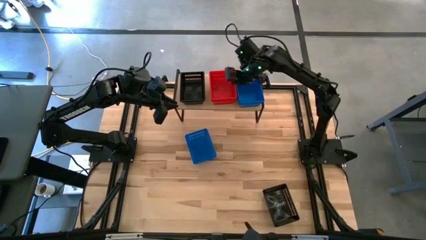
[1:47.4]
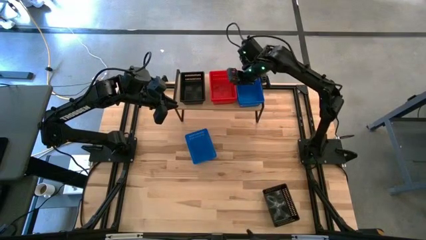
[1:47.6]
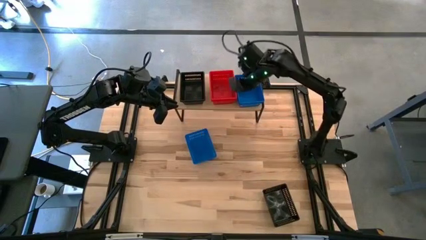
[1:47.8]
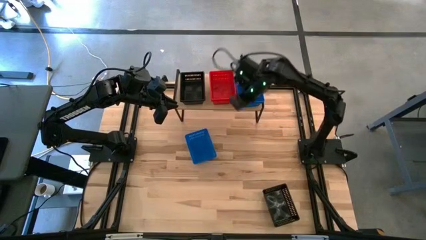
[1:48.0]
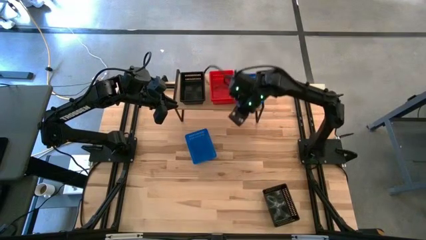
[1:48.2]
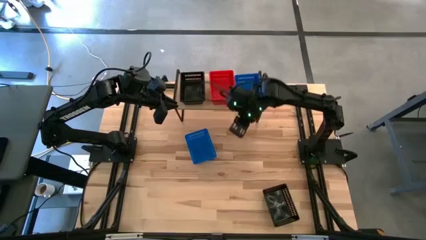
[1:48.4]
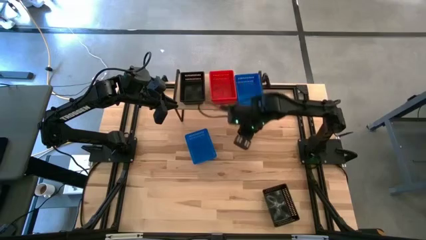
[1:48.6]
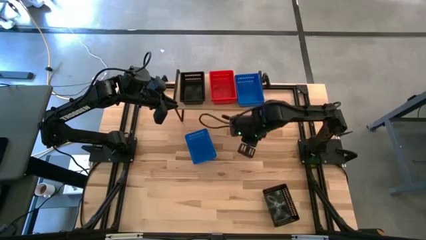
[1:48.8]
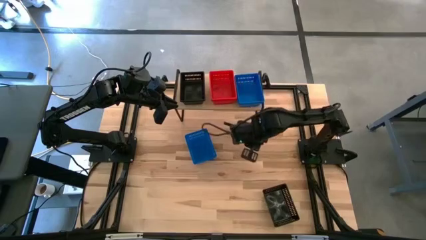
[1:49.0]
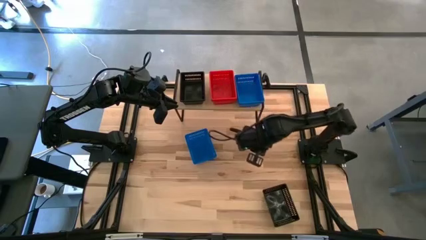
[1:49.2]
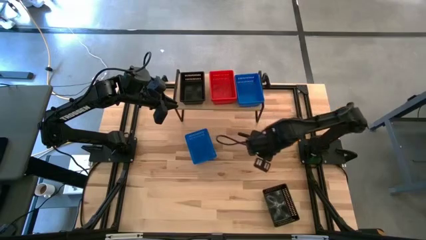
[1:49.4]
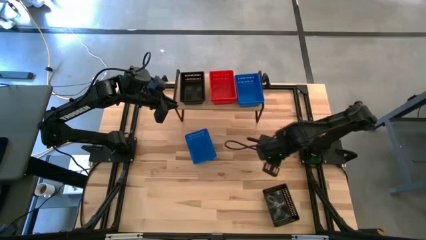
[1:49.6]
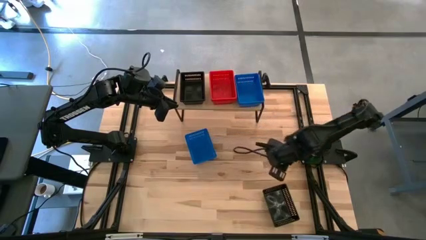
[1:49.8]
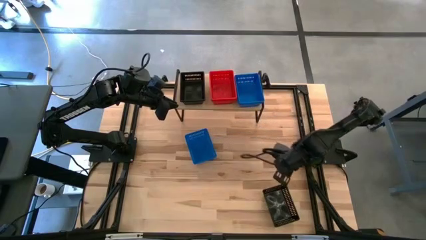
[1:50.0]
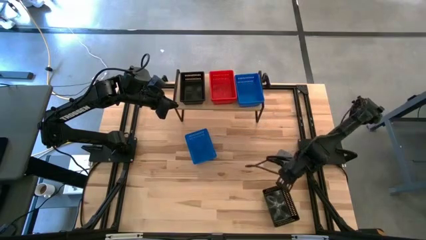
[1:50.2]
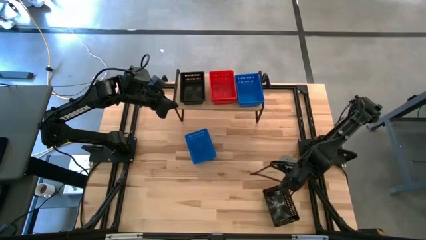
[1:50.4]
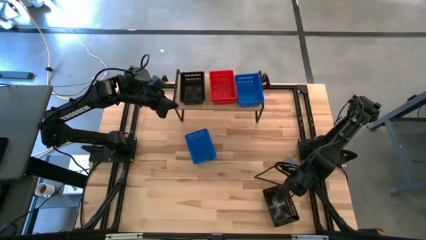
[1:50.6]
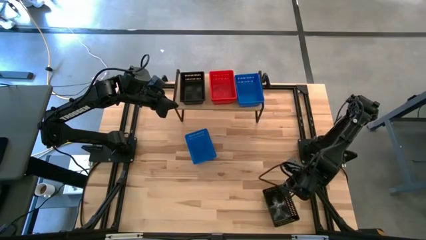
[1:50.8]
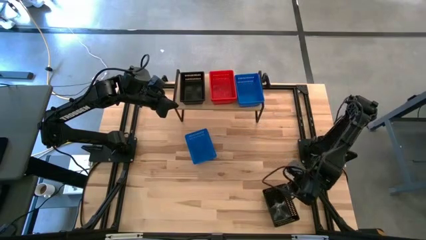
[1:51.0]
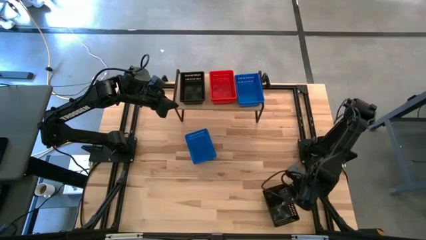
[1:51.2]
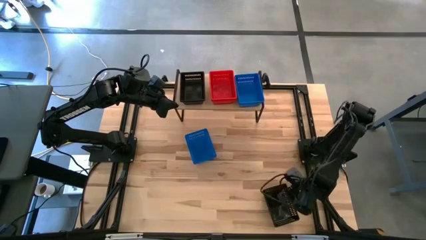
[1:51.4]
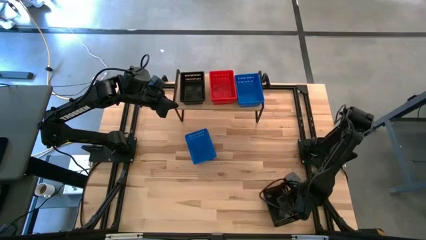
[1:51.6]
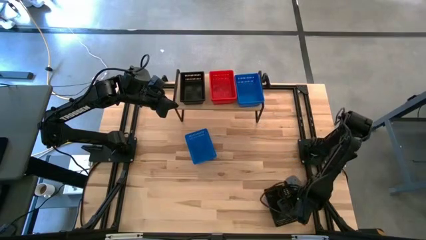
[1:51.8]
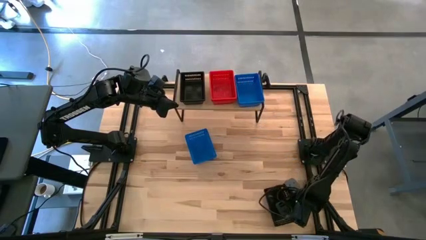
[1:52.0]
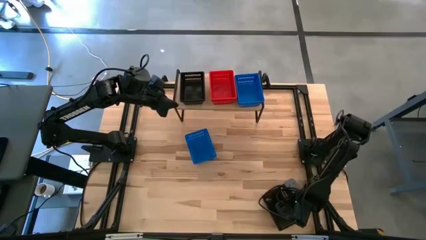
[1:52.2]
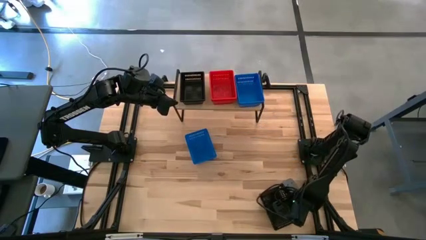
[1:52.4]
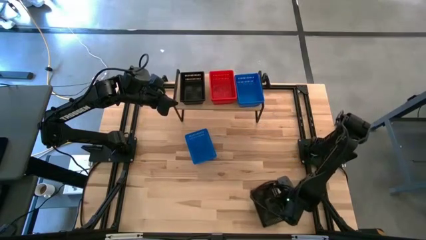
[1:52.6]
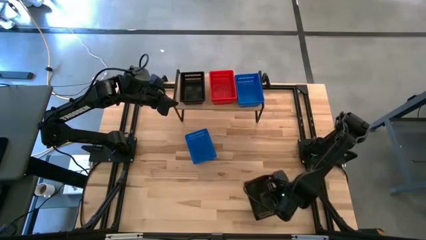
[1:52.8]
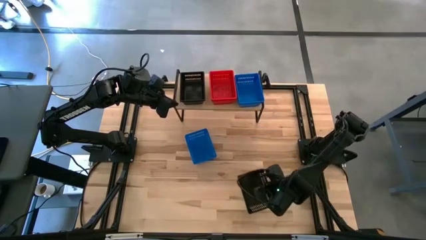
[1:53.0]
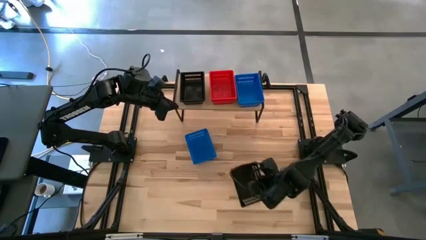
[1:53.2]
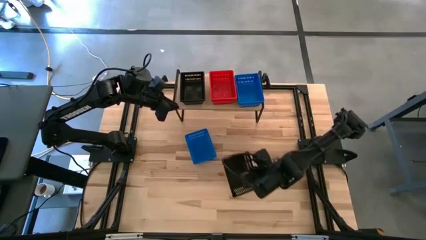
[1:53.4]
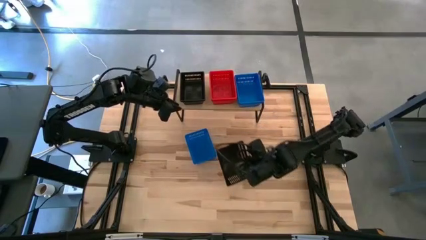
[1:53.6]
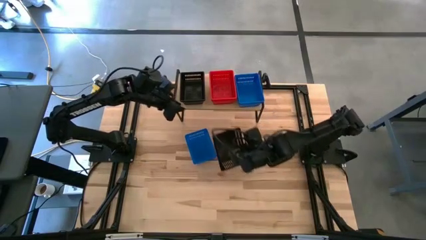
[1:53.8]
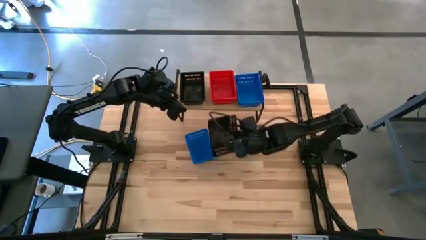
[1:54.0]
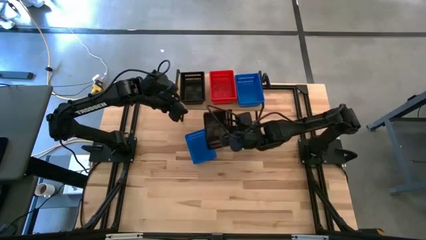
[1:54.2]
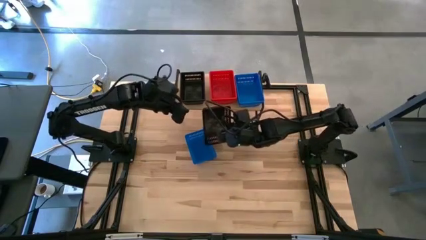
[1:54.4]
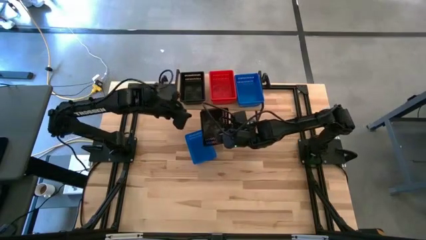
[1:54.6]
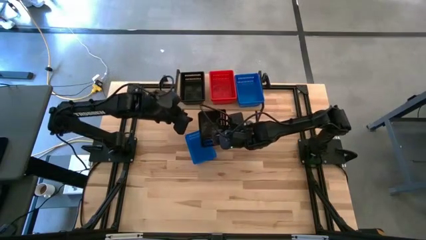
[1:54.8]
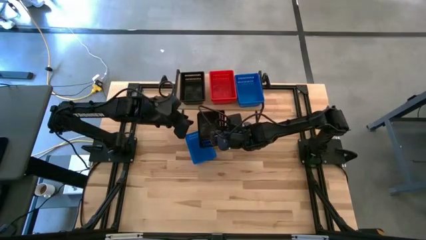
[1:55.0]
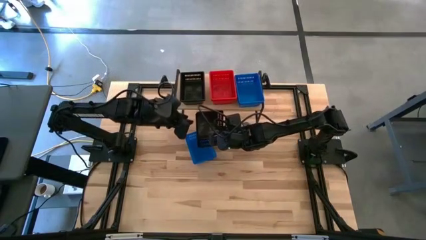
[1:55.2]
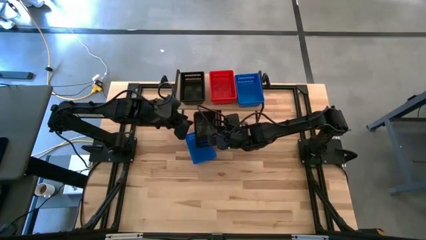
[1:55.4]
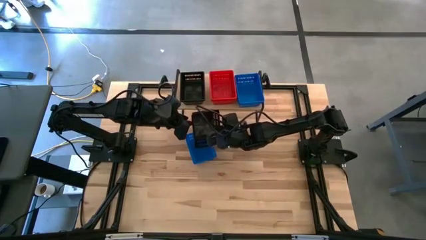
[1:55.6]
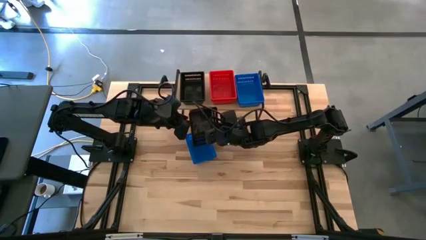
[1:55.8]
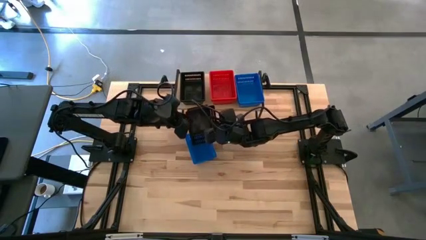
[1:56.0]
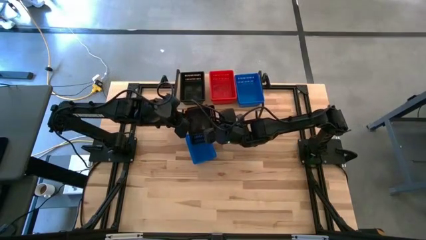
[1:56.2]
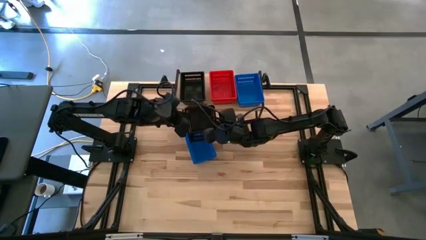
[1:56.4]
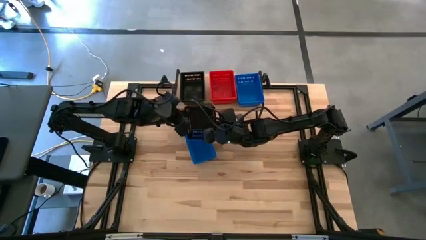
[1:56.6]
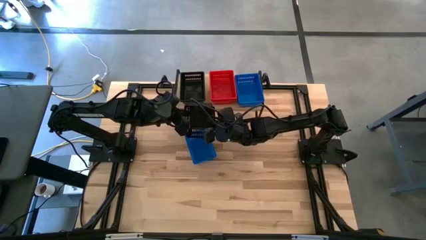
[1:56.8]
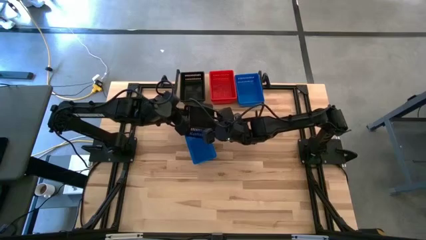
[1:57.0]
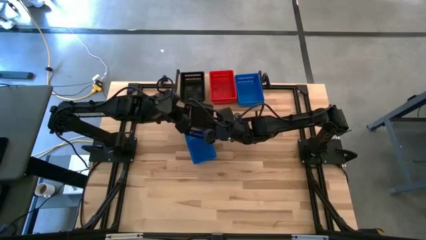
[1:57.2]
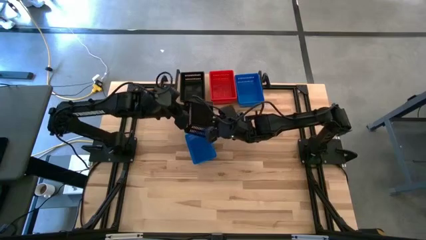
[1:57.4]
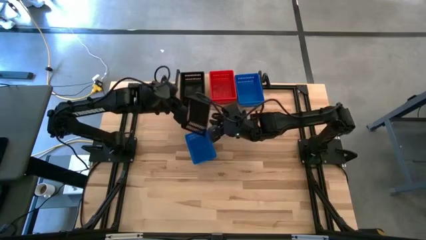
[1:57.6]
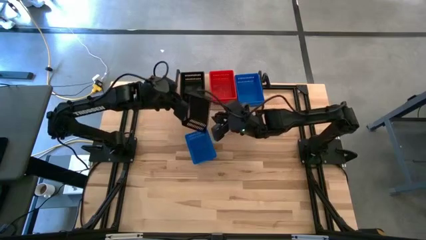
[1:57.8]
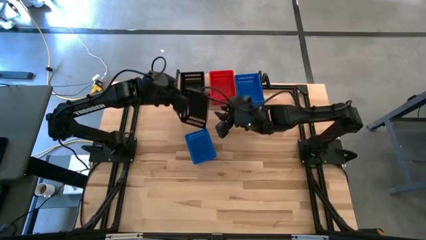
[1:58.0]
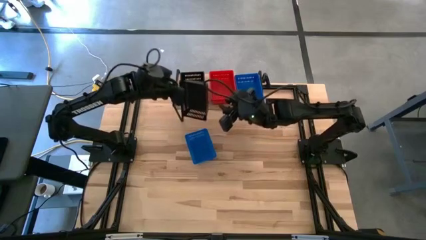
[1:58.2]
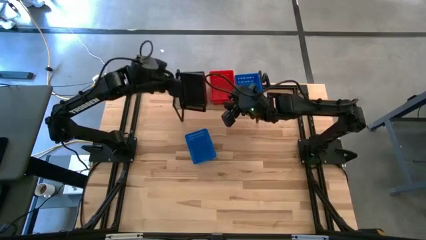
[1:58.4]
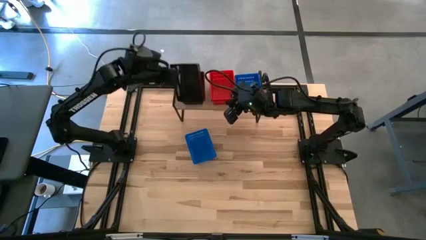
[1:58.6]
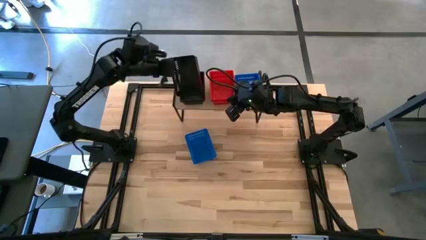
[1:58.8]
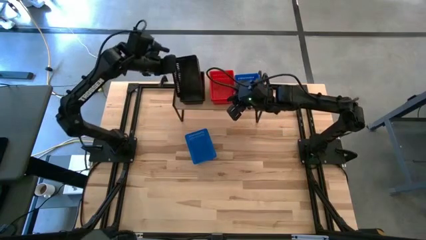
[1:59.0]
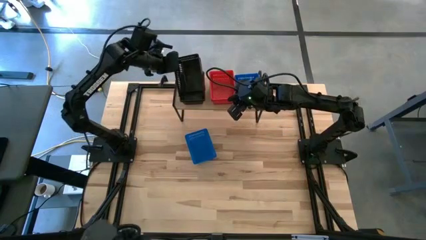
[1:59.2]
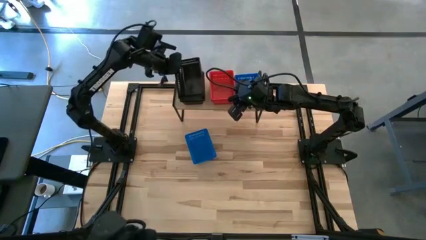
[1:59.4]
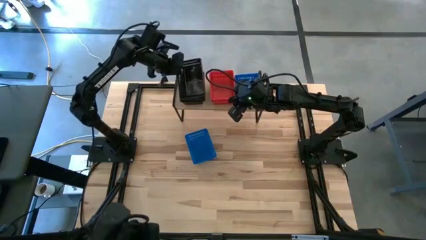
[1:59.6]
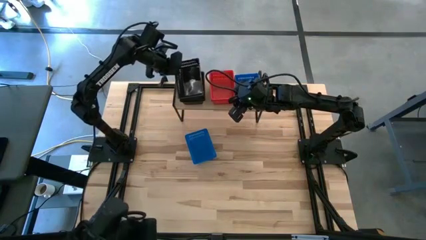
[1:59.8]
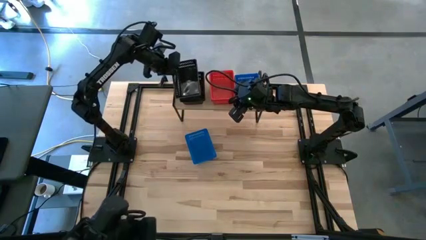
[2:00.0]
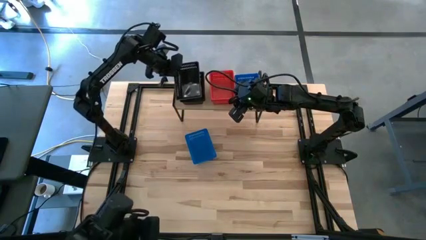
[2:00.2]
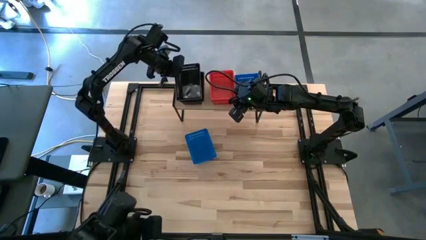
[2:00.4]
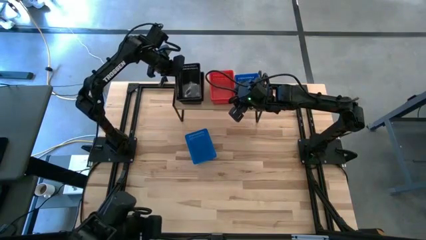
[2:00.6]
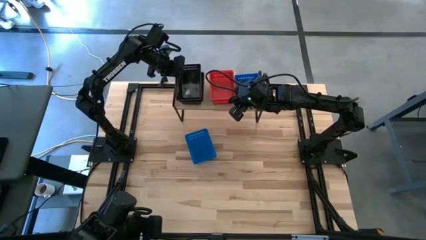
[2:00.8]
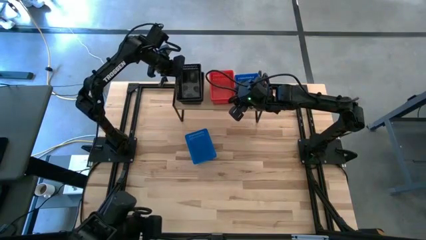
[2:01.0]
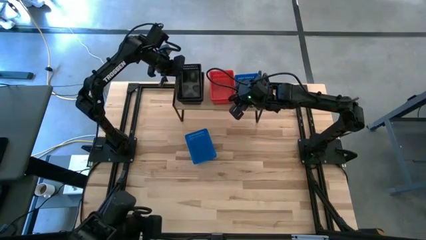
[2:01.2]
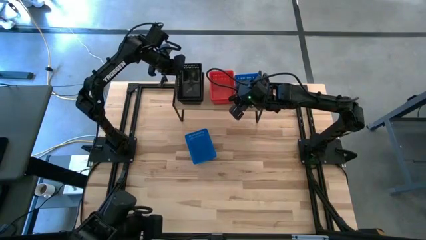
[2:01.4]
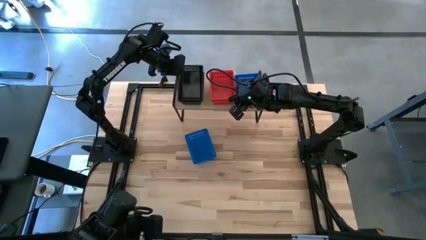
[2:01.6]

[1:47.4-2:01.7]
Task: Stack baskets on shelf by color
Stack the black bin on top of the stacked black bins on the shelf

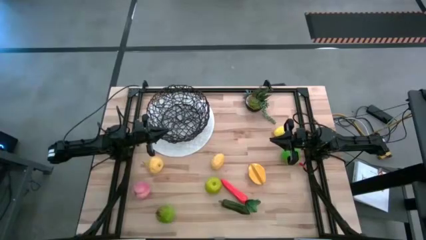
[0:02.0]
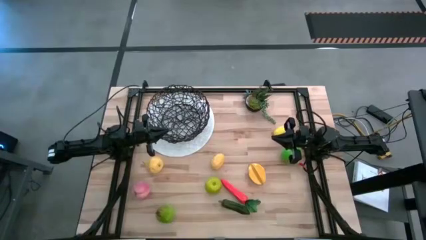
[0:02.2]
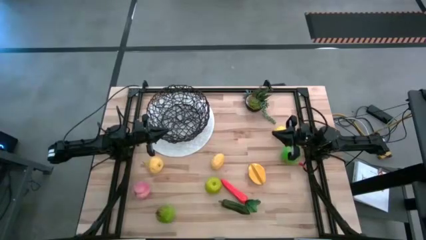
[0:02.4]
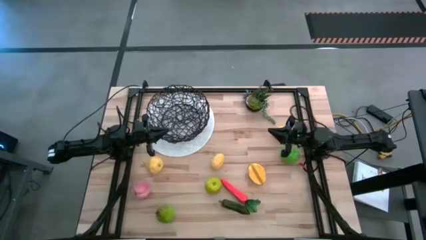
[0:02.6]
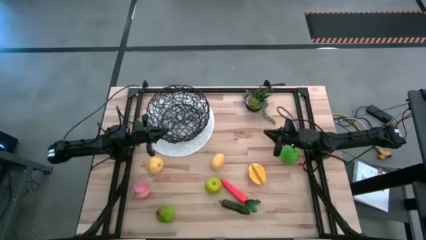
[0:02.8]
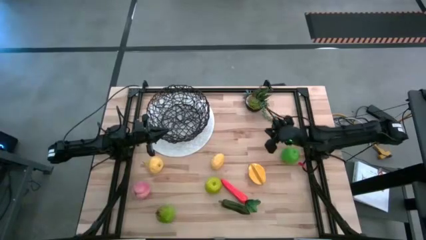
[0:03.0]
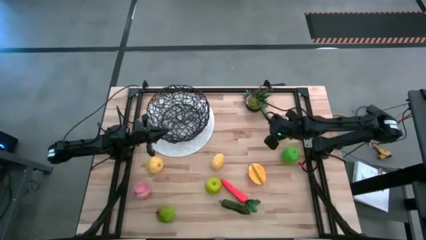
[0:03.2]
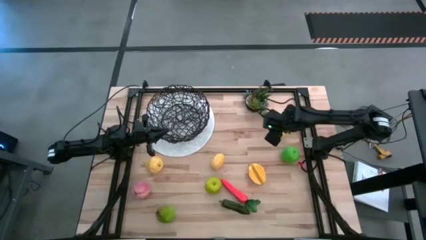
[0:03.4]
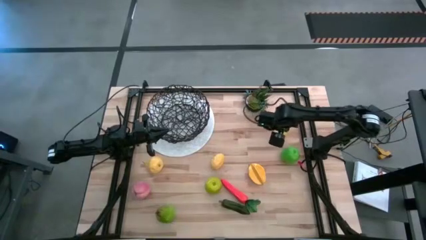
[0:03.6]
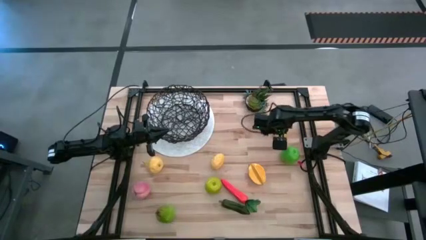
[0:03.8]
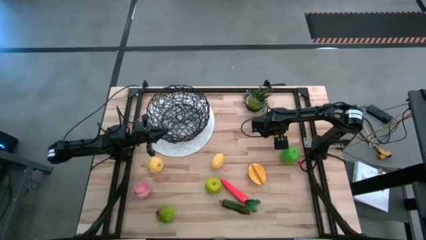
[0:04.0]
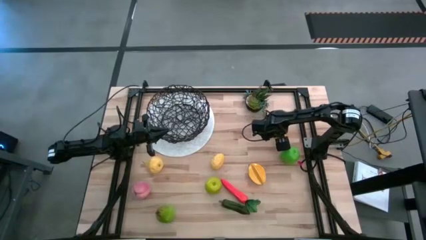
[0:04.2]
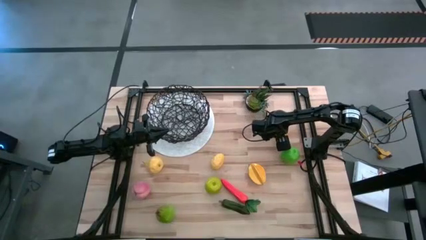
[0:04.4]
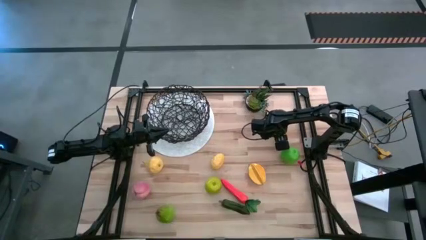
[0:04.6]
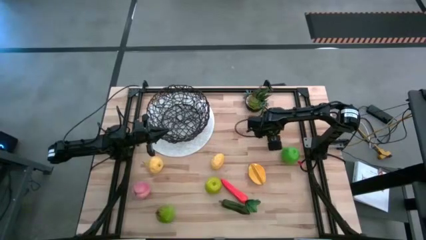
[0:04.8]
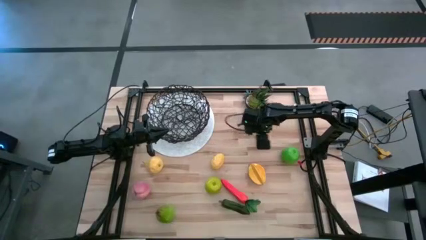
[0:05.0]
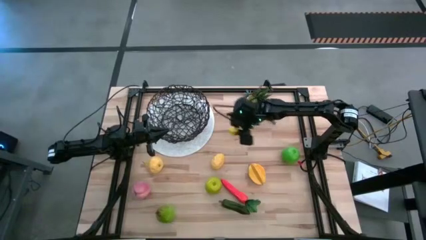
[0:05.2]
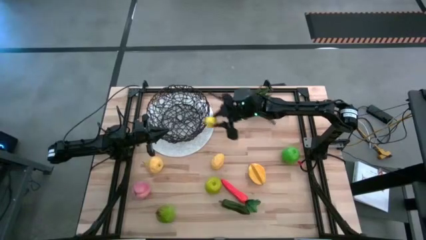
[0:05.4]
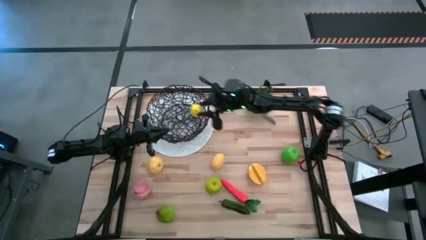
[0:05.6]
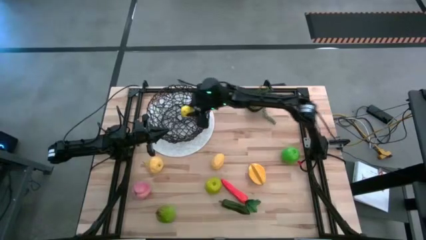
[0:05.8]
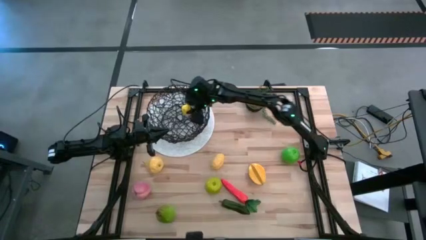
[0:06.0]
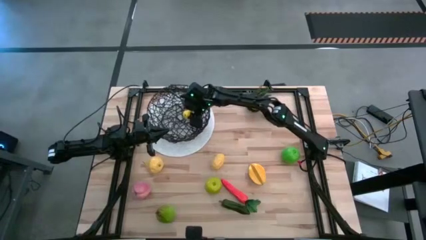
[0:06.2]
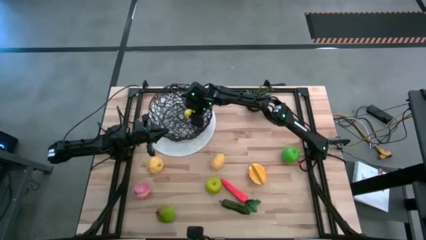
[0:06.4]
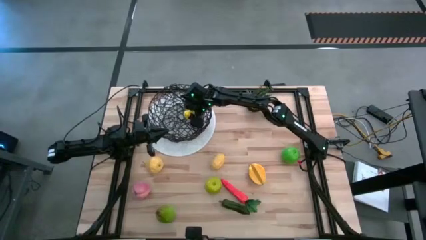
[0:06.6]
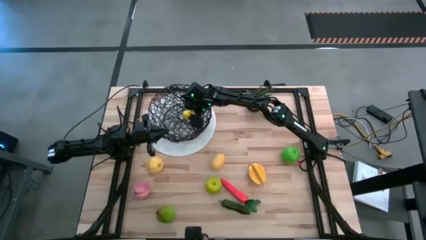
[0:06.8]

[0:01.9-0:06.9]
Task: Build produce basket
Put the yellow lemon into the wire basket
